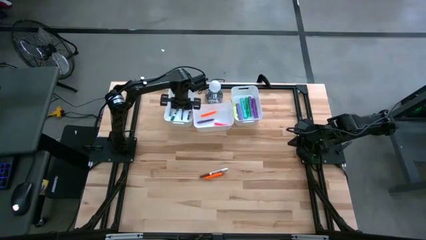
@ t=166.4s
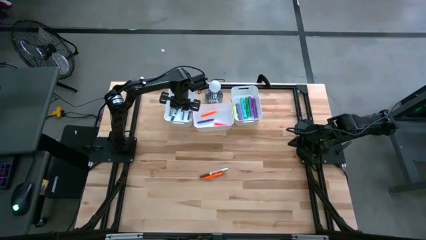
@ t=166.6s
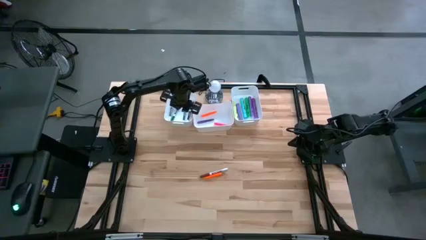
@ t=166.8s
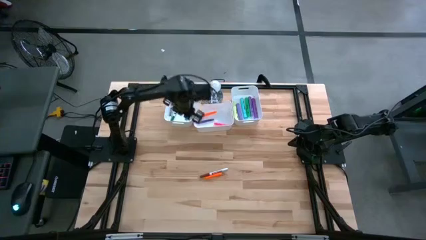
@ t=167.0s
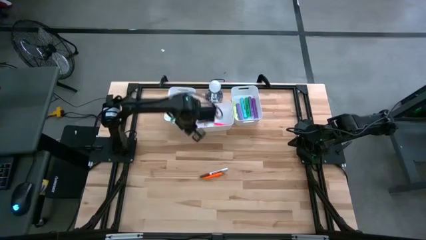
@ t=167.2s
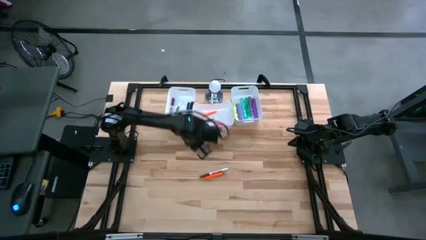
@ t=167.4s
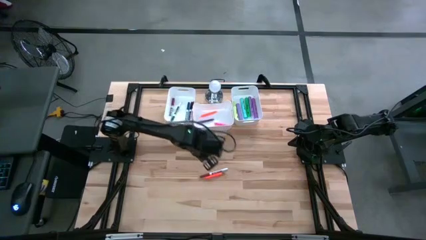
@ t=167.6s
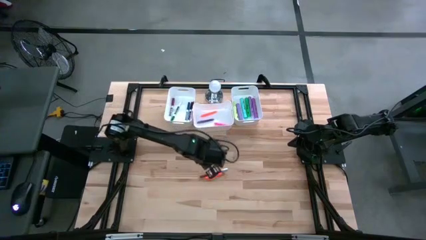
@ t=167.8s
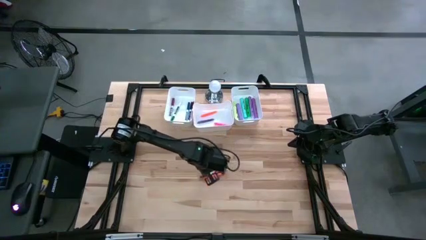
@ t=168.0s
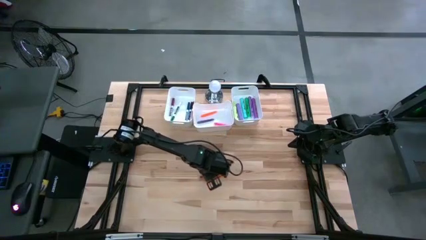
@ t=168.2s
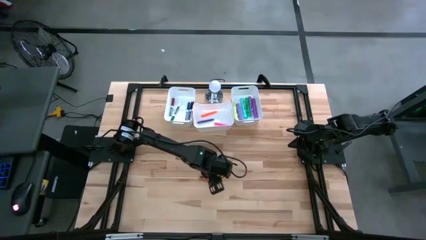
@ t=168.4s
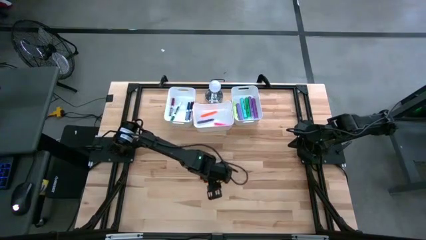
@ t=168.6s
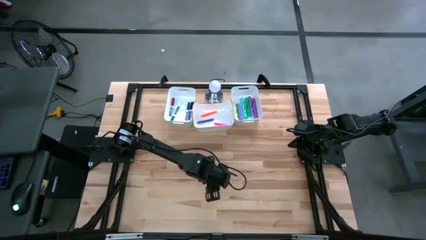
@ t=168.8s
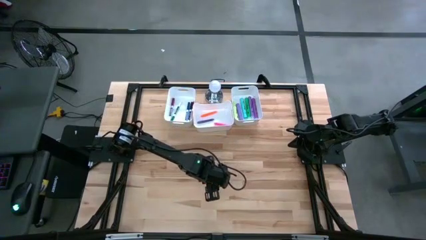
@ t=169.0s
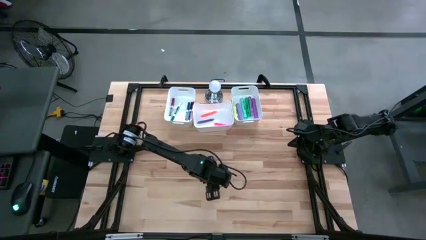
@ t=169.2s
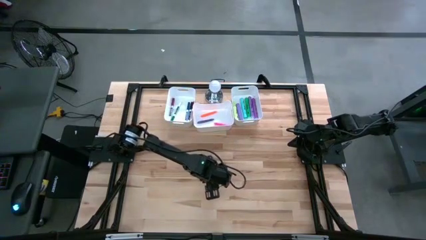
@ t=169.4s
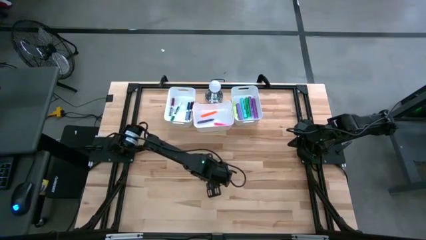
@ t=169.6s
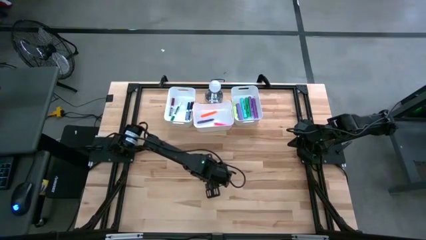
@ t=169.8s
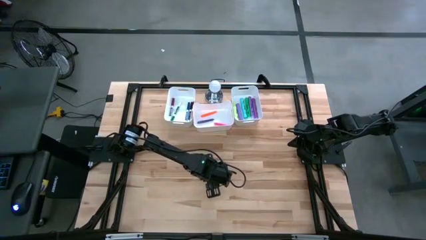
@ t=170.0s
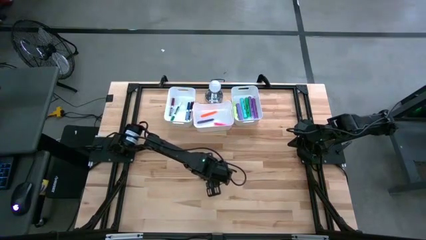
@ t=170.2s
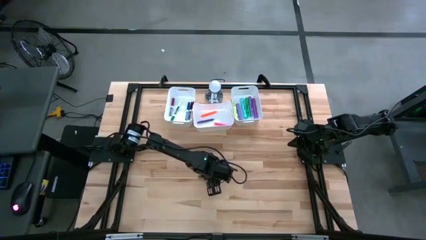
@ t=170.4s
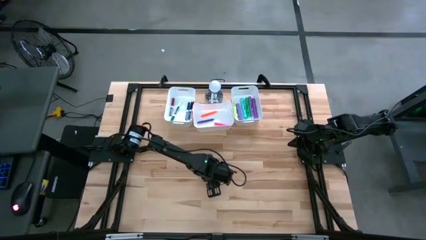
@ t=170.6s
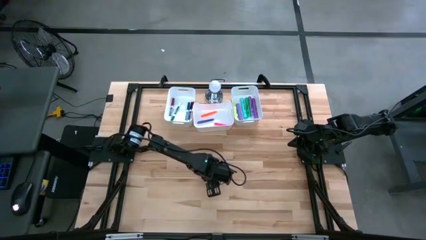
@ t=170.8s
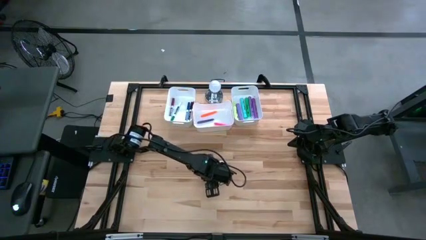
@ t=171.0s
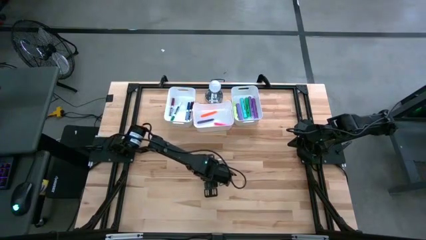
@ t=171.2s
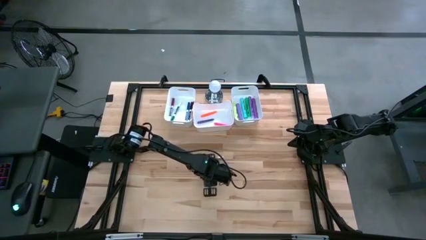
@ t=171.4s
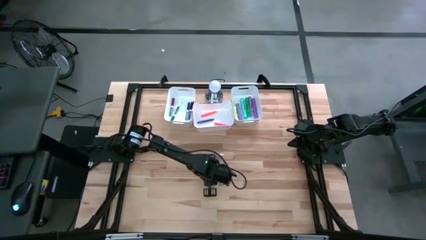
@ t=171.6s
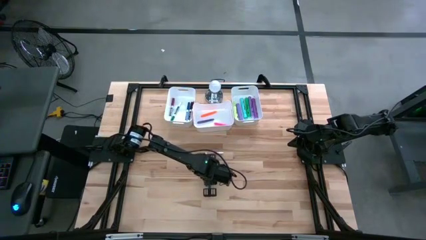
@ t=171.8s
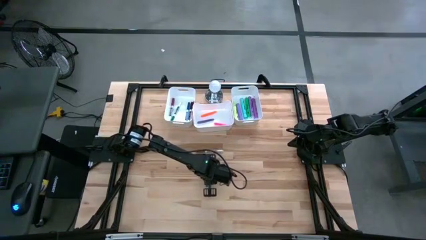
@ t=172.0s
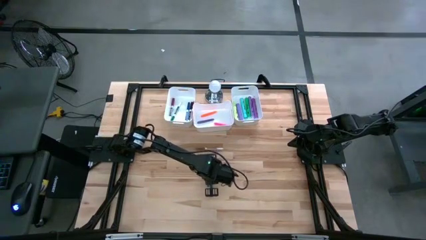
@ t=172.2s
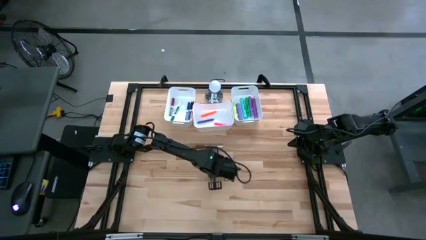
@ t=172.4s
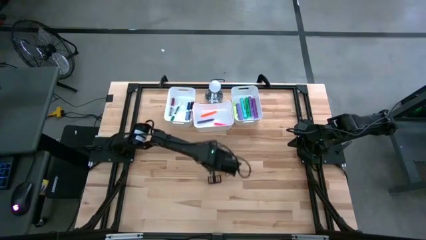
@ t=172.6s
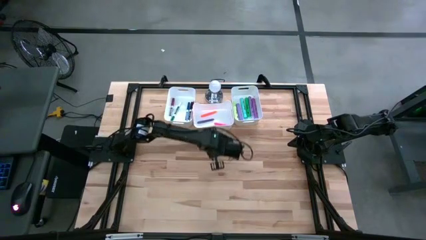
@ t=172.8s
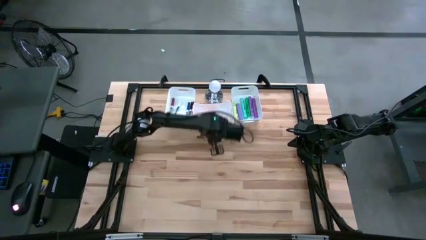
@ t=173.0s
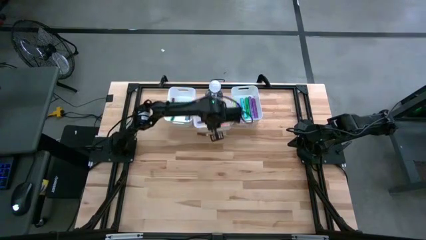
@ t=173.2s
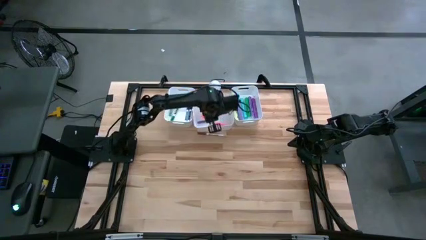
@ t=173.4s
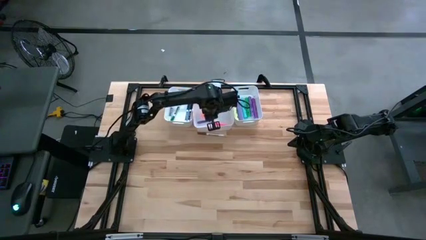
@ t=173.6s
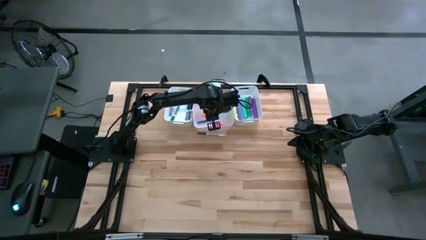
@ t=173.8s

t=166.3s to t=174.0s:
Task: Pick & Place Markers
Put the orange pen into the middle white bin

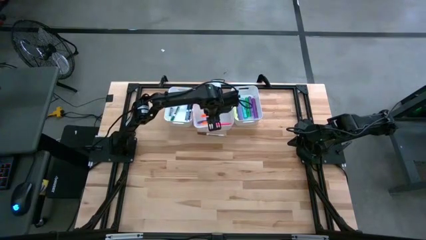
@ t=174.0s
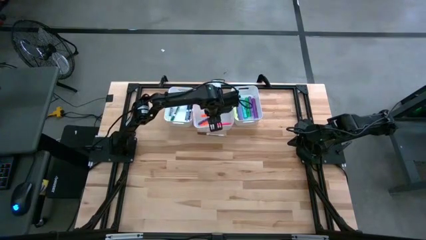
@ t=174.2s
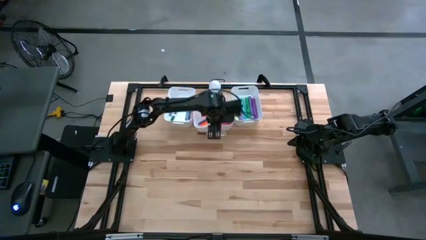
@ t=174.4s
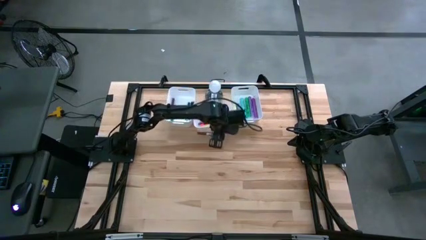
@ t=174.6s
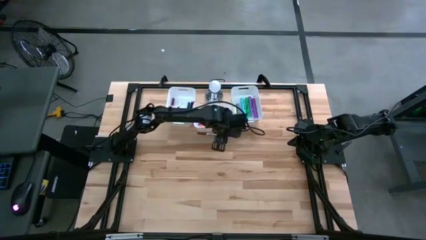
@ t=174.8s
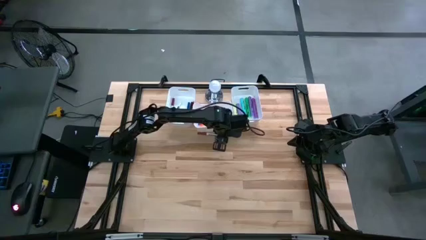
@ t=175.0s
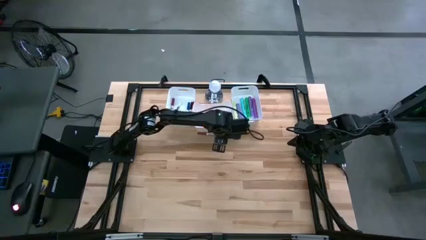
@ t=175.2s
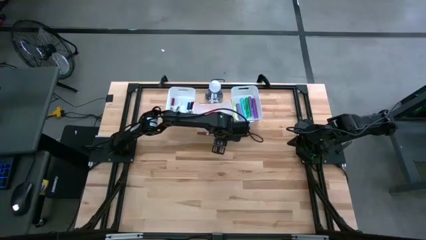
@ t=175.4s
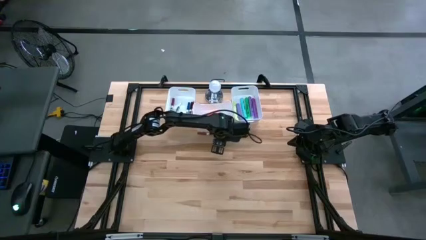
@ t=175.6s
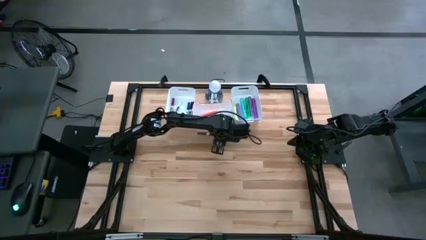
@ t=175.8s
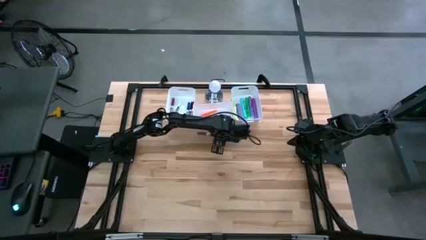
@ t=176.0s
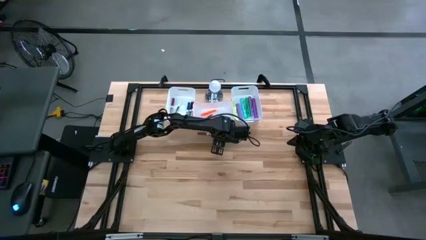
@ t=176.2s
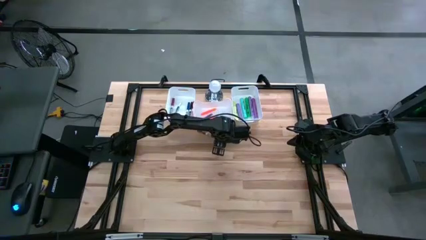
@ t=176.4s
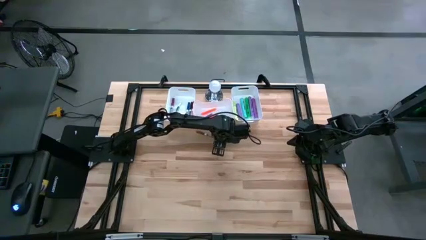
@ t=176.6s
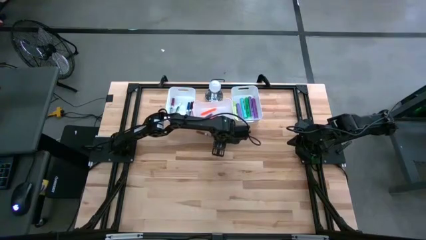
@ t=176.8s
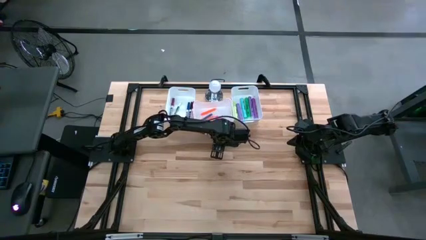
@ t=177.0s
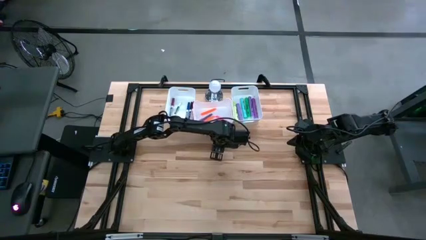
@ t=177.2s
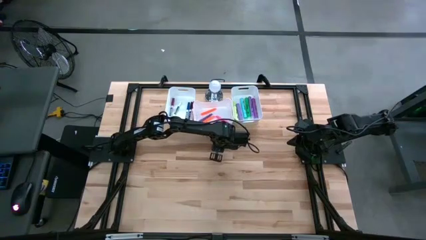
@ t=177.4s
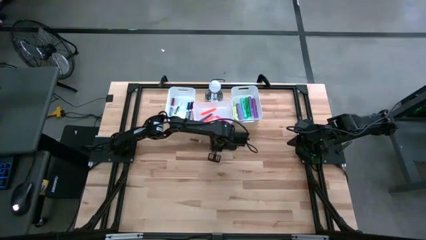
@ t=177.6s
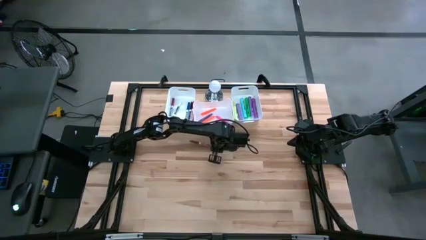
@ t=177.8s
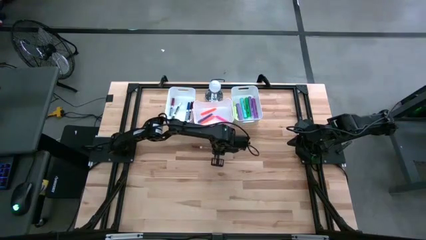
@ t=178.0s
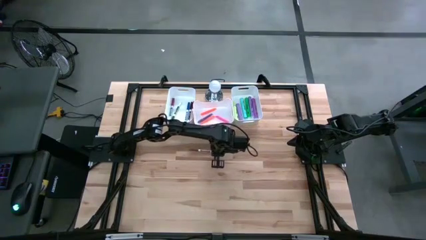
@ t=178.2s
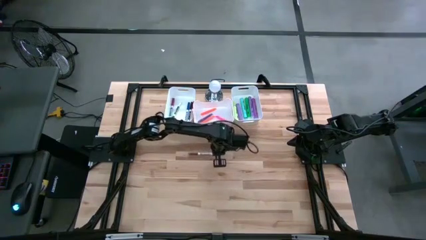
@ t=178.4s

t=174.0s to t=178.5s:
Put the brown marker pen into the middle white bin
